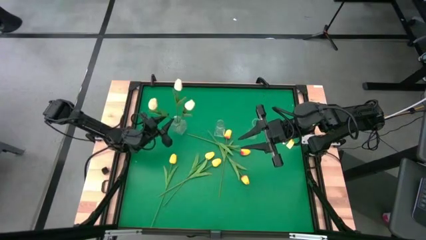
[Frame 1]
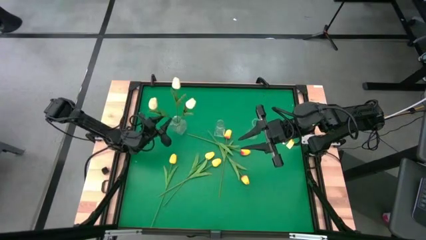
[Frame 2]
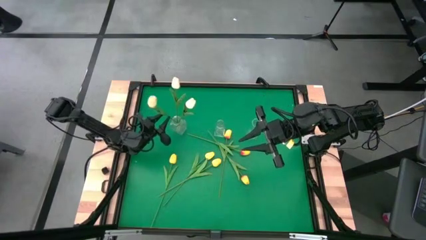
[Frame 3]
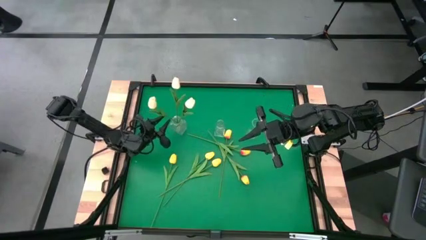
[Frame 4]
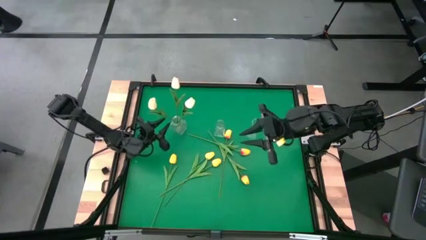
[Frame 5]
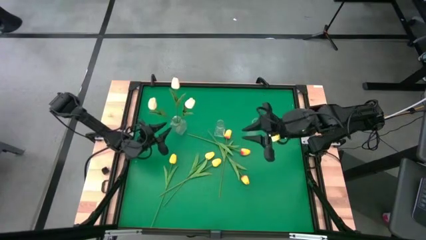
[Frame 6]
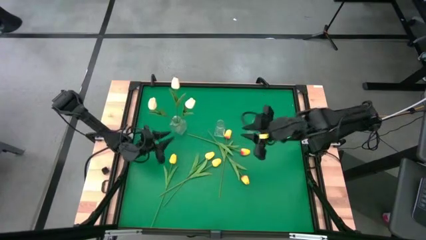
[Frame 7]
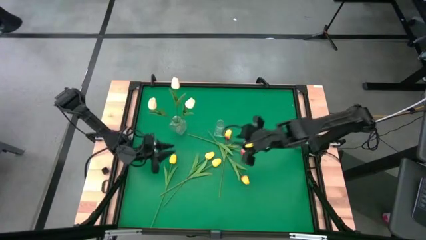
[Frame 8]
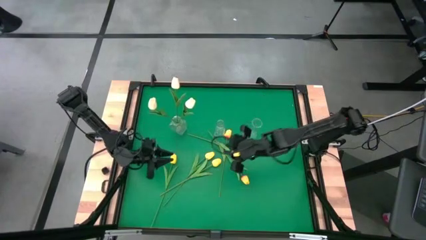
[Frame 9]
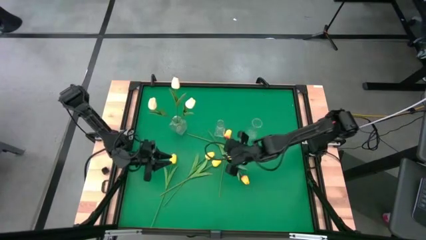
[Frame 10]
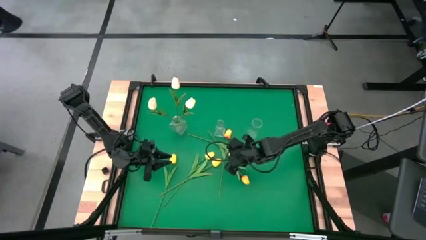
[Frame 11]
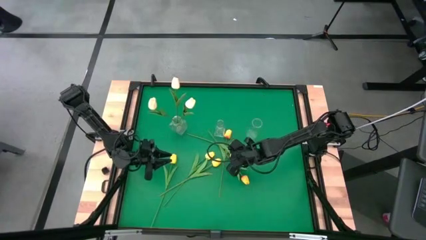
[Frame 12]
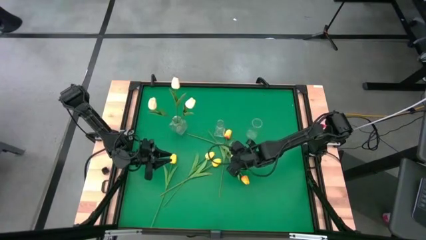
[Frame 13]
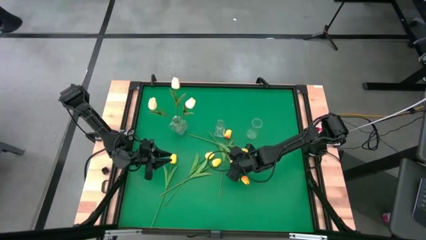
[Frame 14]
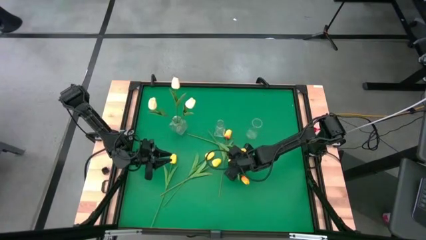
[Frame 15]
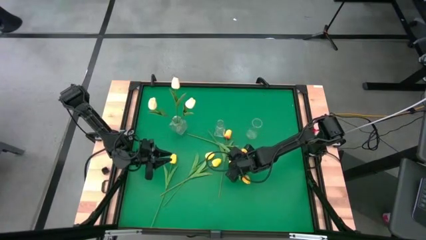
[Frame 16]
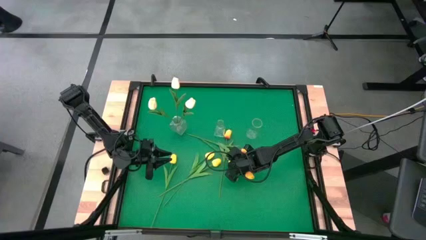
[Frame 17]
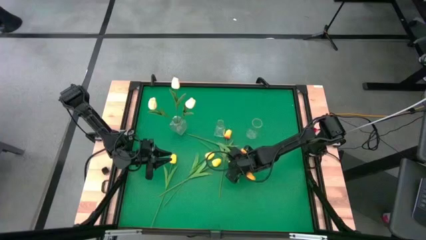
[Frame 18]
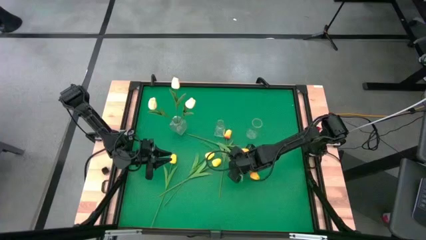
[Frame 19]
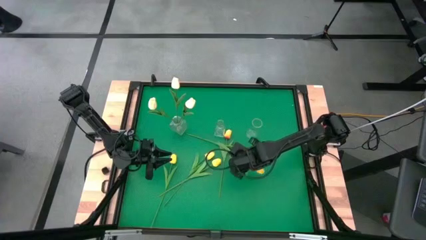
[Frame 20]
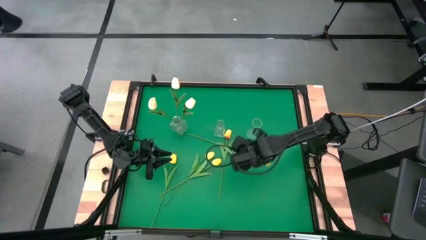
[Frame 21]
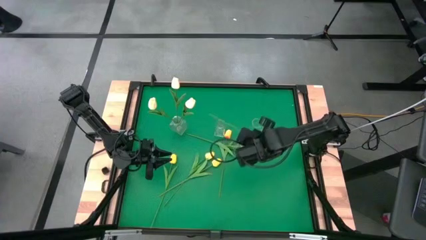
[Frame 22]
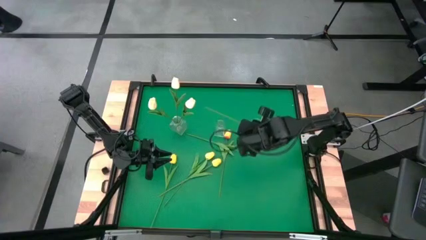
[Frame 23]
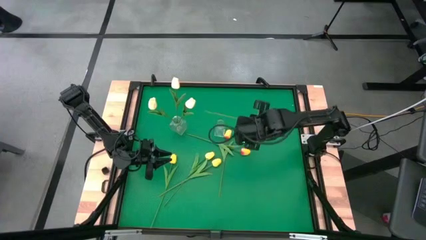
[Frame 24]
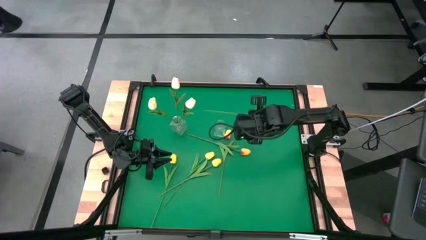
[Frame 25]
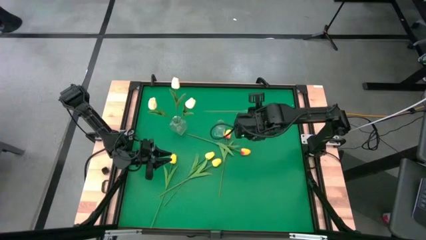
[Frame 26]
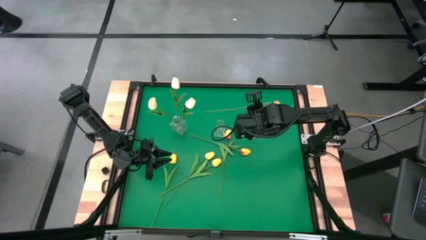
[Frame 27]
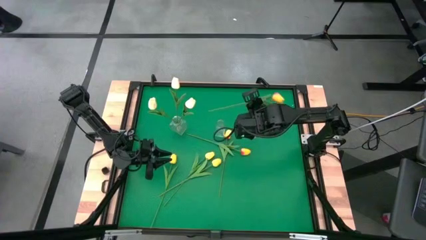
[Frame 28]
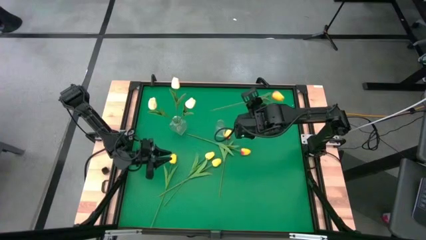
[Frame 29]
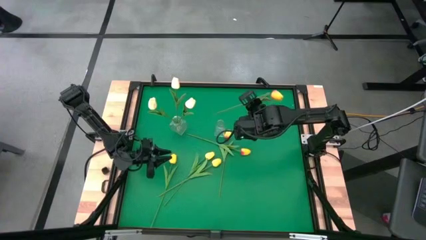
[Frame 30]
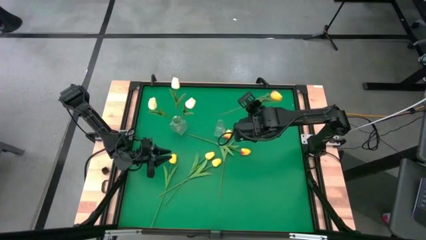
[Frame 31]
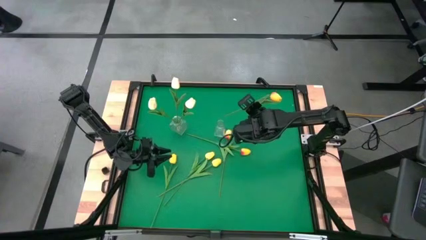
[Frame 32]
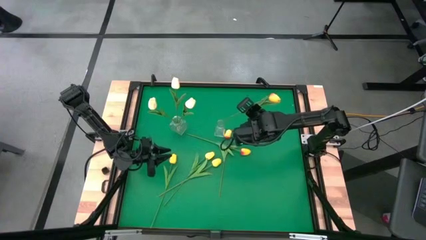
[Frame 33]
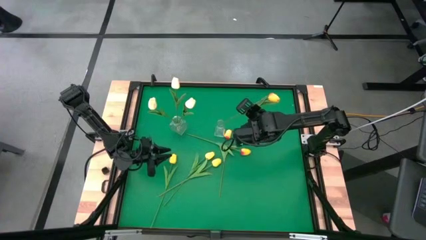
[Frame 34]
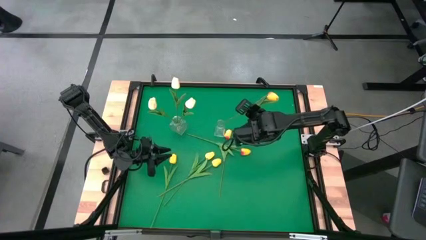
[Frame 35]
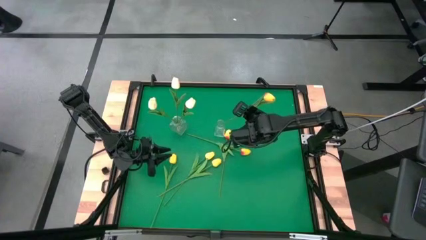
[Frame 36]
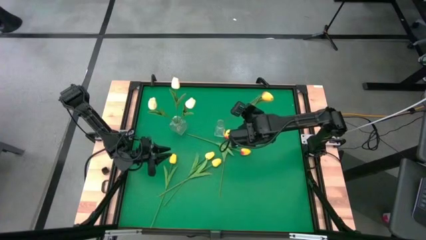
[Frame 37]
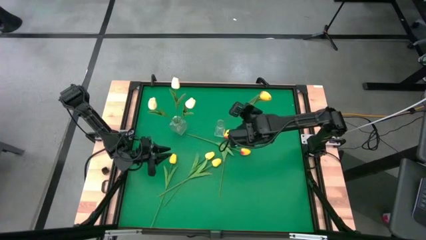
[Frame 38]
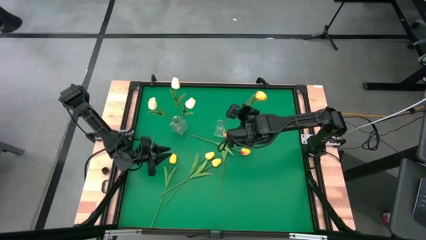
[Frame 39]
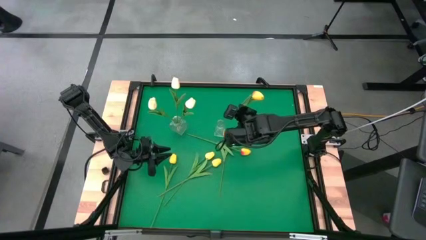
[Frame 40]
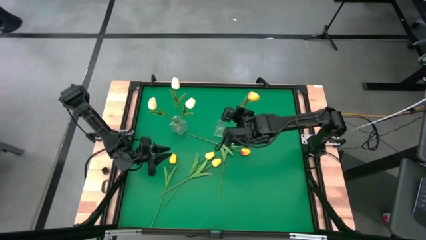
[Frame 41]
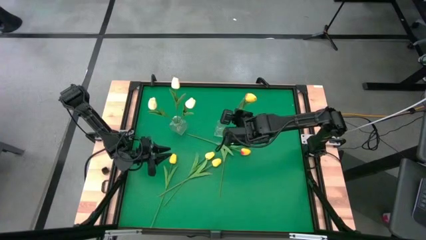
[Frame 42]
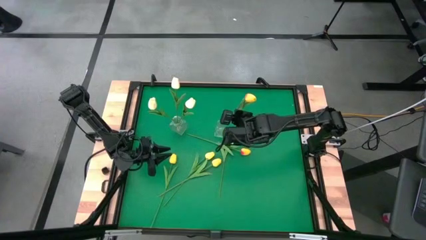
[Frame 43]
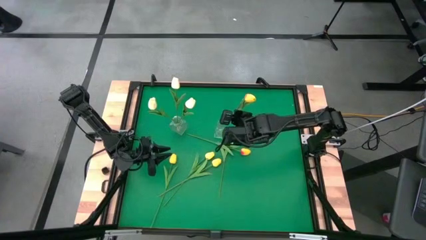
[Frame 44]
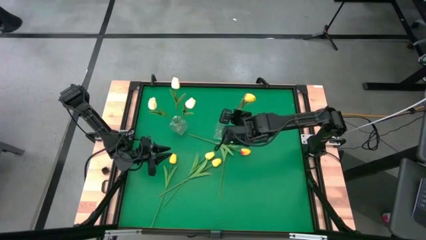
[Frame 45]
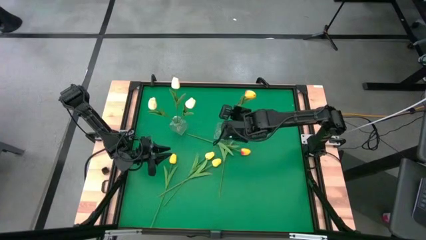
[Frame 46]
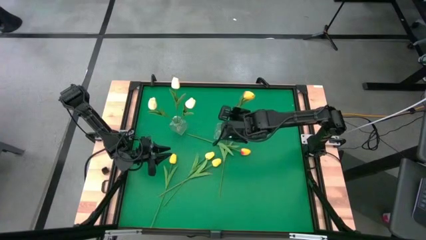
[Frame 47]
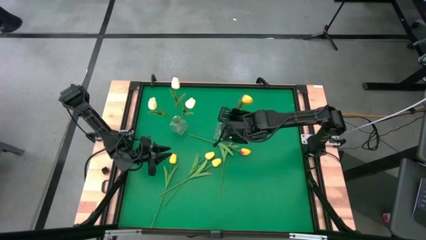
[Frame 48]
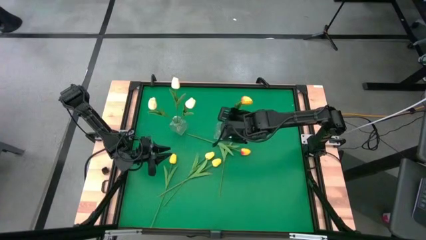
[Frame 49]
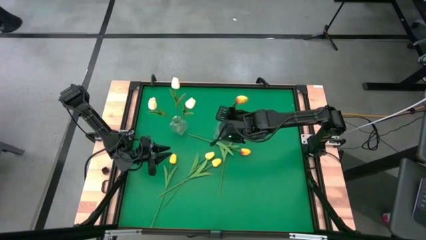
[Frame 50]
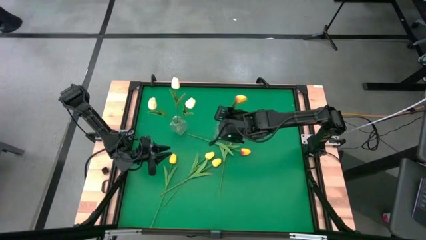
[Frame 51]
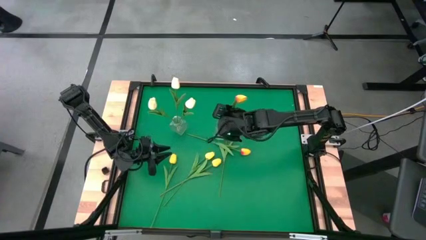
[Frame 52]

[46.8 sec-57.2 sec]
Task: Sort flowers into vase by color
Put the bottom yellow red flower into the middle transparent vase

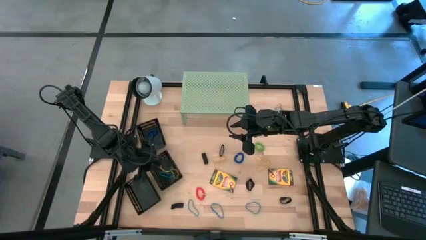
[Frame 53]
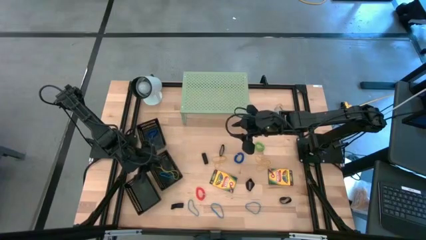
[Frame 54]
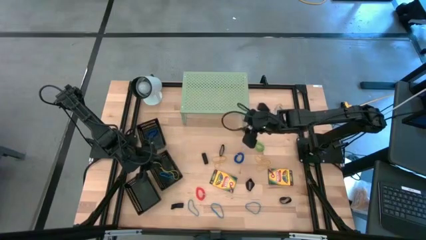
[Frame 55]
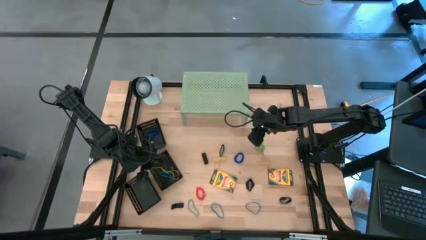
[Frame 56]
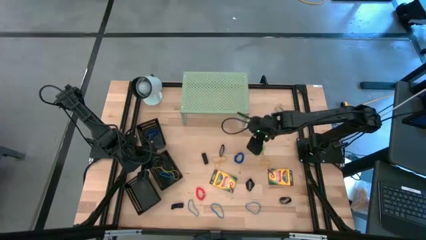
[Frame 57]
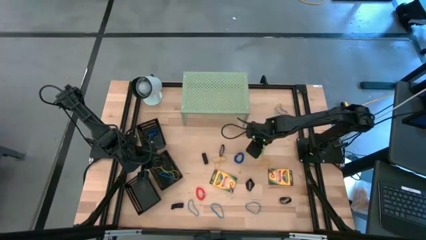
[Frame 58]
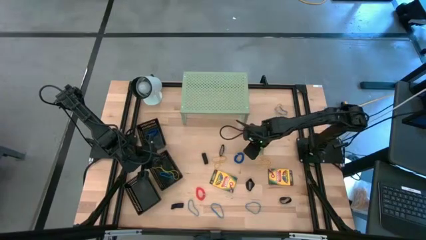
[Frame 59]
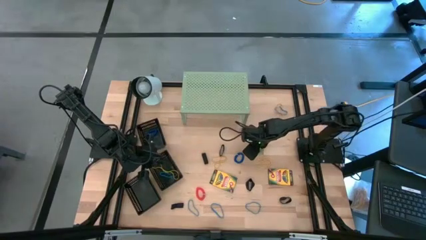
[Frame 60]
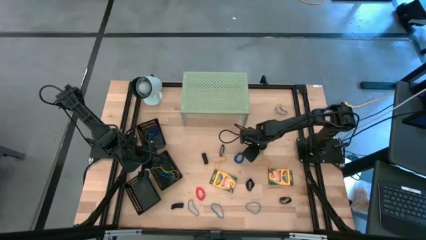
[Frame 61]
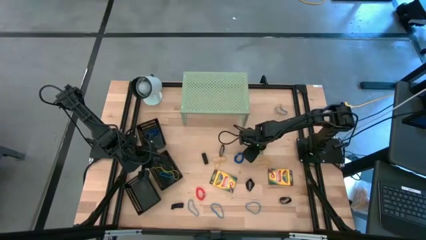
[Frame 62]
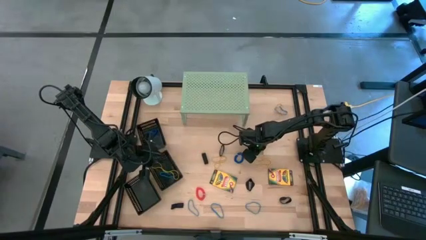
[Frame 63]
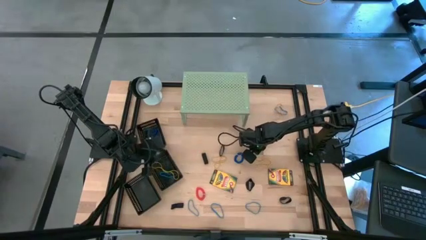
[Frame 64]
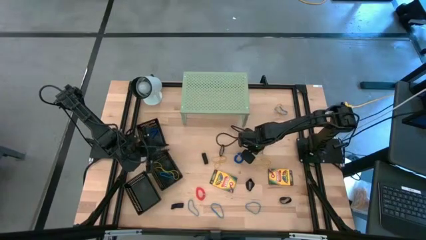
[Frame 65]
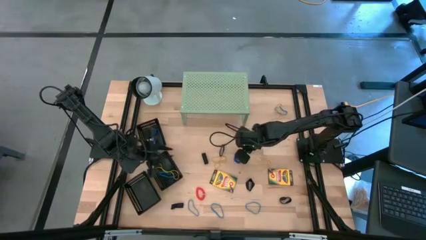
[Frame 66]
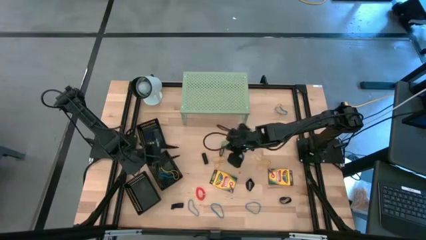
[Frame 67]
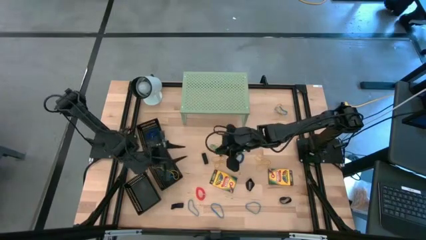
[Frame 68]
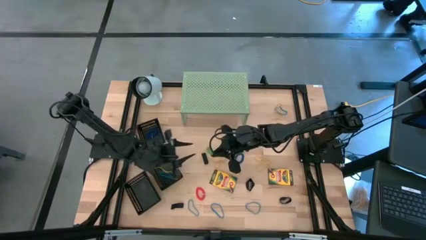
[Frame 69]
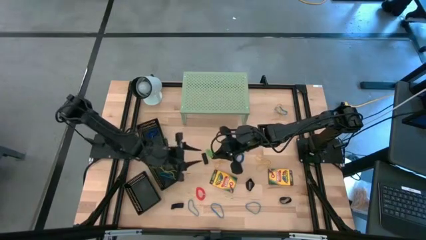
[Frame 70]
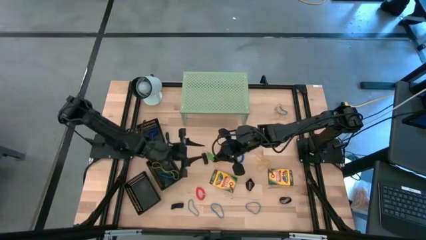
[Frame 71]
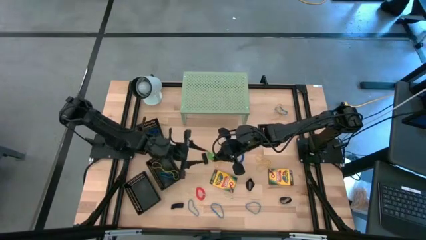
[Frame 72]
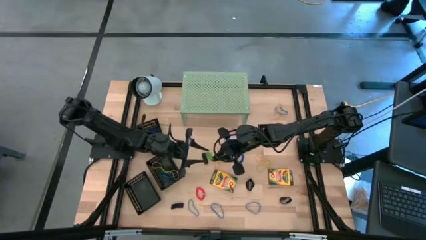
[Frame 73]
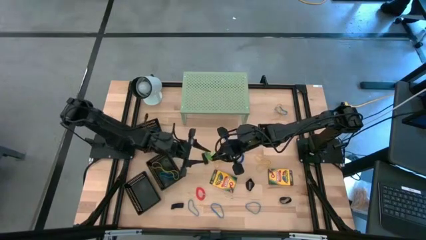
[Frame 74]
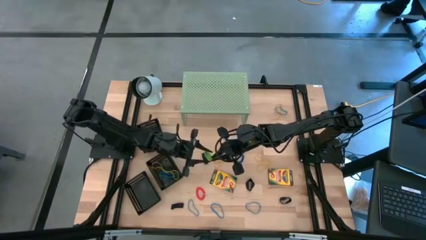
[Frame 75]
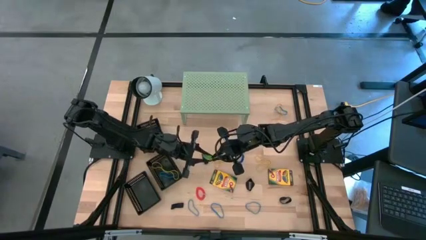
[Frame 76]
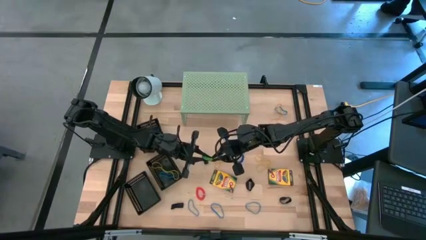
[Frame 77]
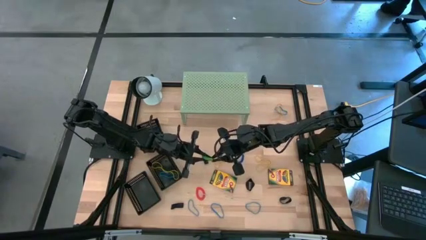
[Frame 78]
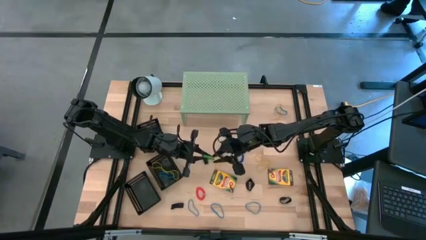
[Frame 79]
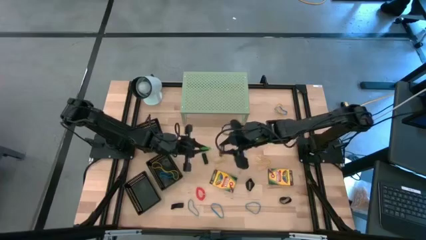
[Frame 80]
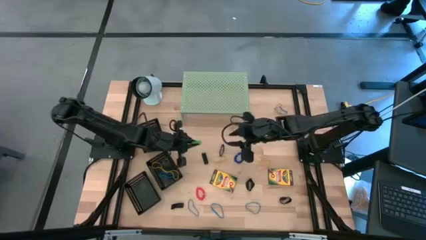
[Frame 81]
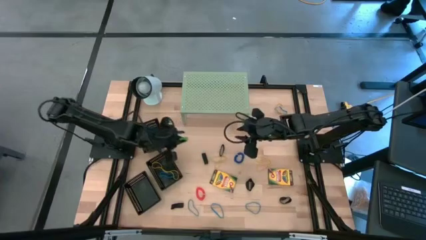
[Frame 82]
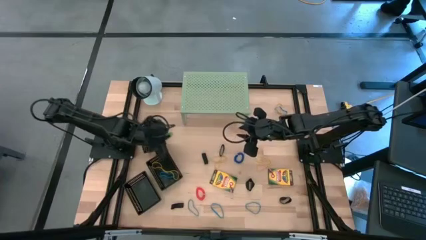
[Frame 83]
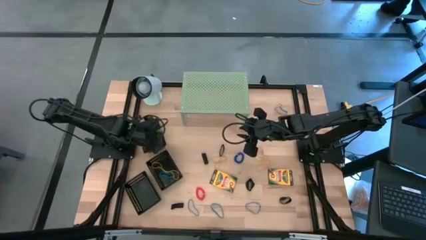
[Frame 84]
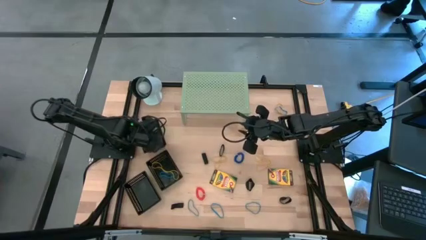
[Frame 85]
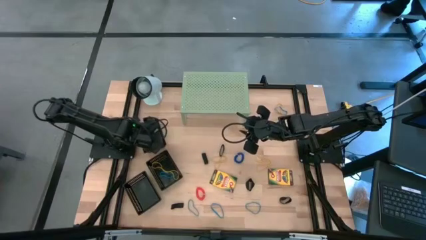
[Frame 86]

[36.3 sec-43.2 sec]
Task: Pick & Place Office Desk Supplies
Put the green spring rubber band into the top black bin
